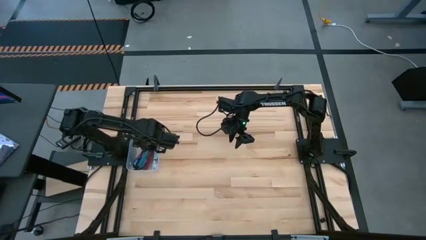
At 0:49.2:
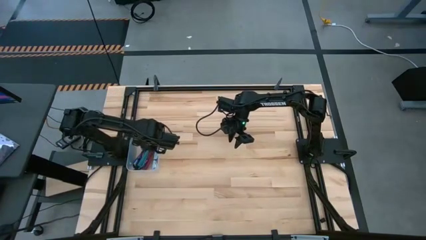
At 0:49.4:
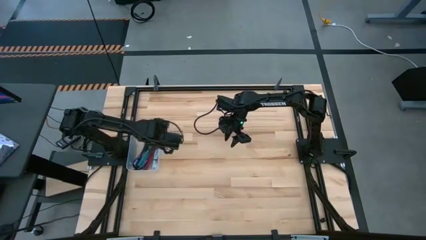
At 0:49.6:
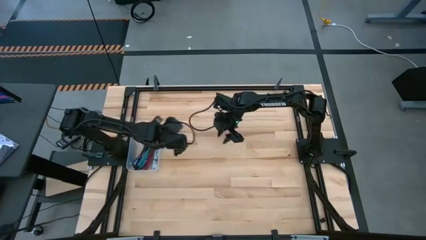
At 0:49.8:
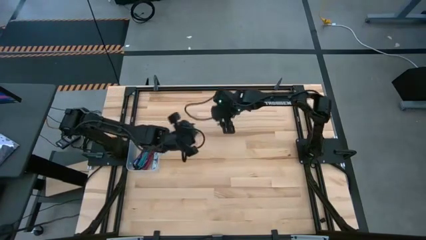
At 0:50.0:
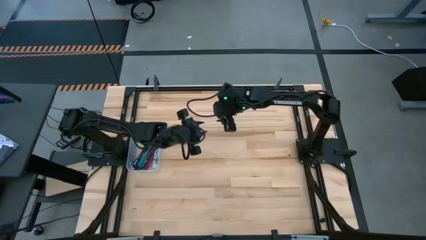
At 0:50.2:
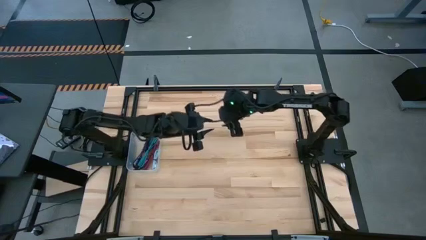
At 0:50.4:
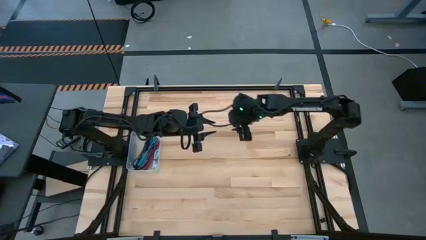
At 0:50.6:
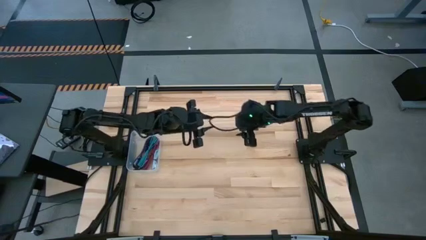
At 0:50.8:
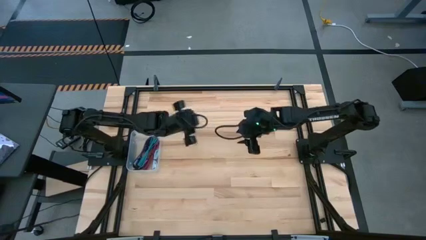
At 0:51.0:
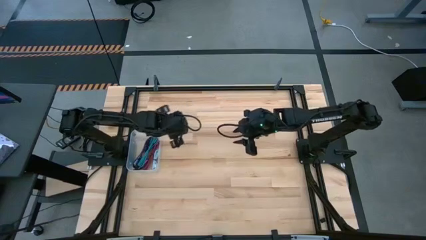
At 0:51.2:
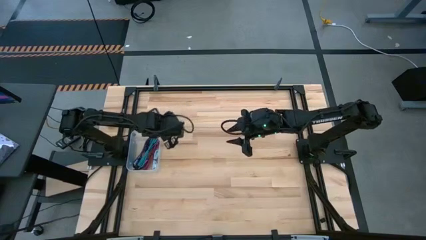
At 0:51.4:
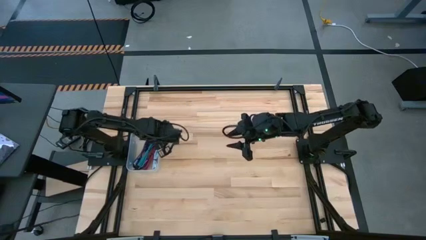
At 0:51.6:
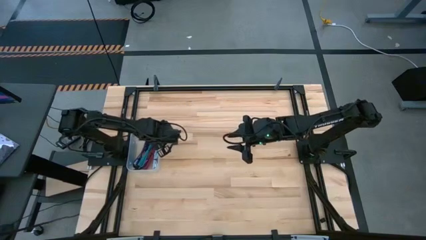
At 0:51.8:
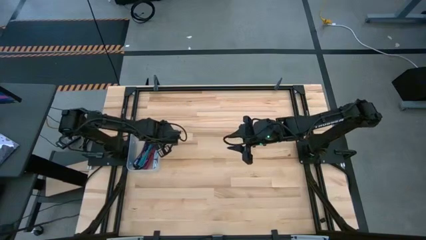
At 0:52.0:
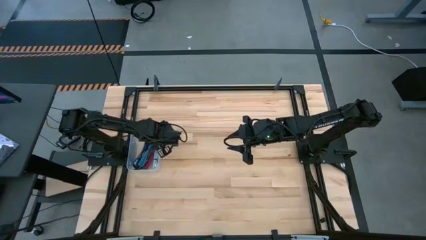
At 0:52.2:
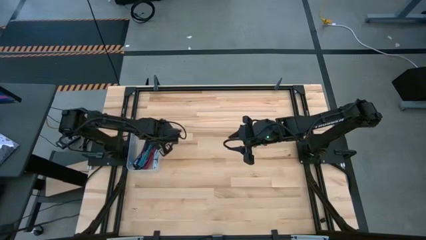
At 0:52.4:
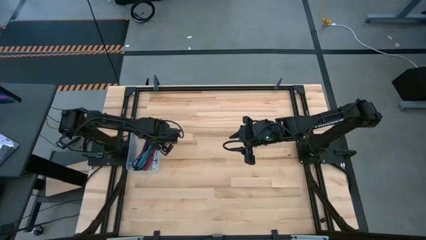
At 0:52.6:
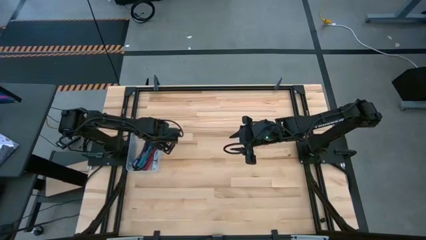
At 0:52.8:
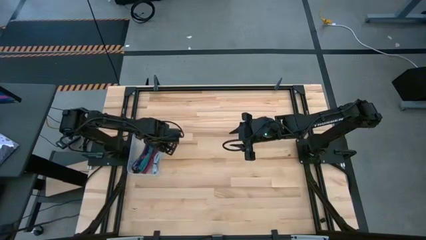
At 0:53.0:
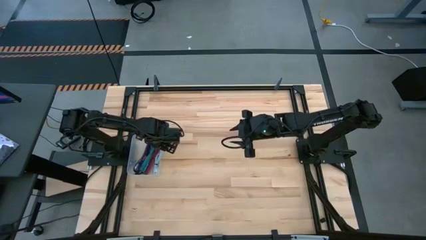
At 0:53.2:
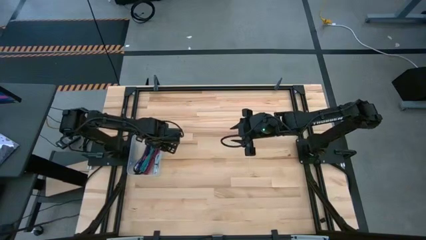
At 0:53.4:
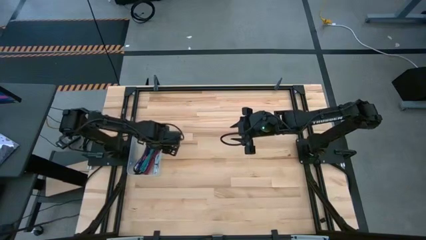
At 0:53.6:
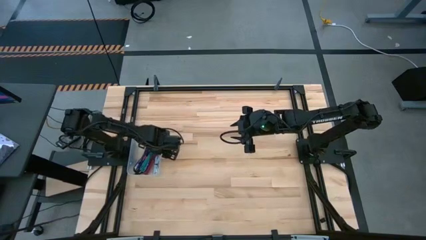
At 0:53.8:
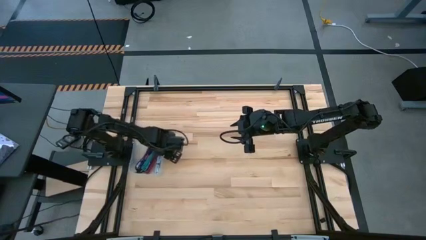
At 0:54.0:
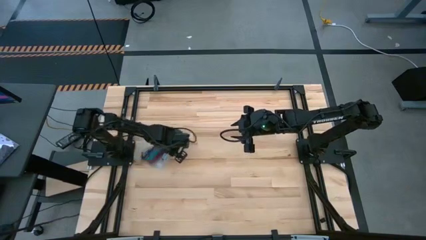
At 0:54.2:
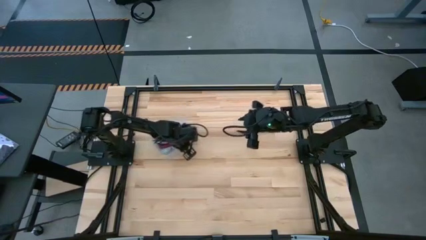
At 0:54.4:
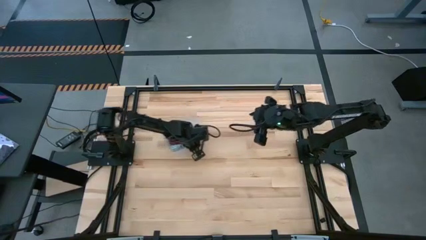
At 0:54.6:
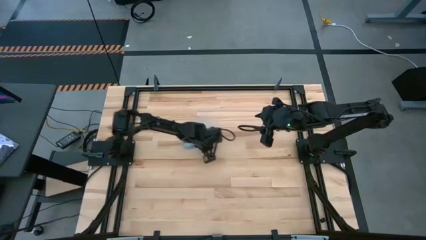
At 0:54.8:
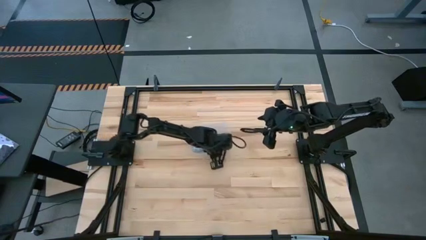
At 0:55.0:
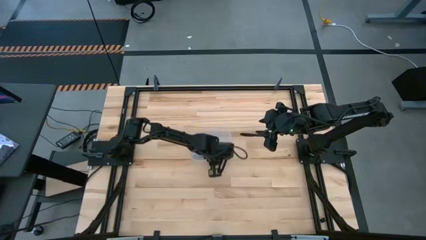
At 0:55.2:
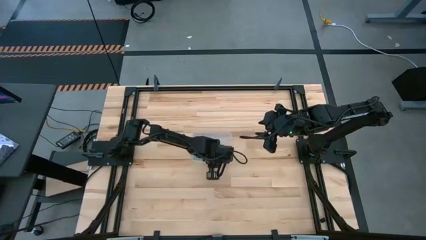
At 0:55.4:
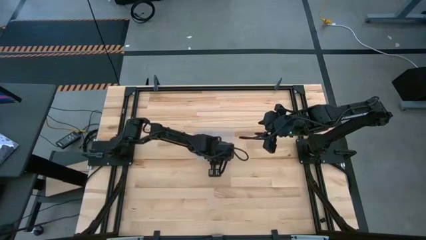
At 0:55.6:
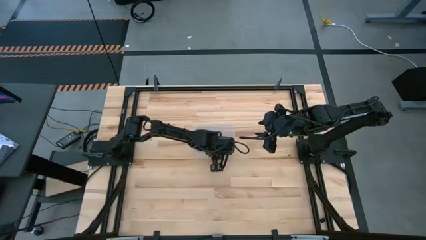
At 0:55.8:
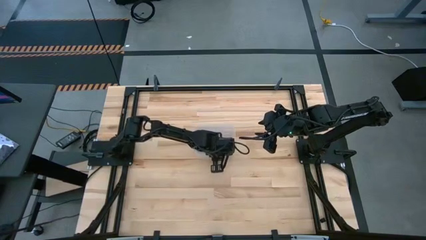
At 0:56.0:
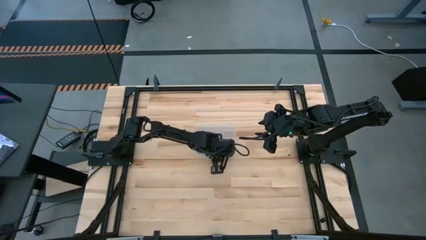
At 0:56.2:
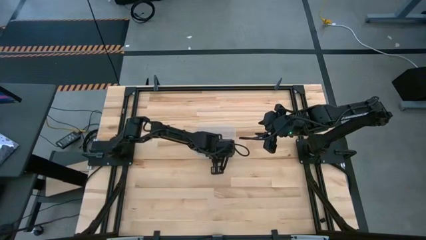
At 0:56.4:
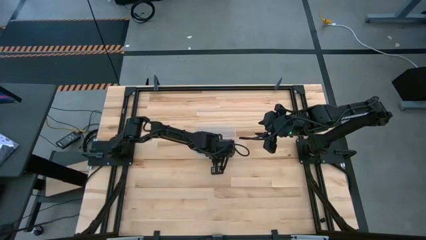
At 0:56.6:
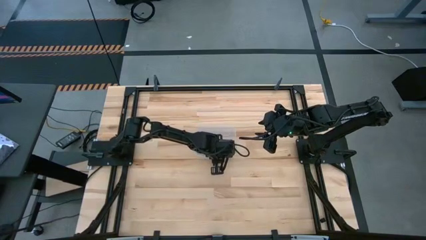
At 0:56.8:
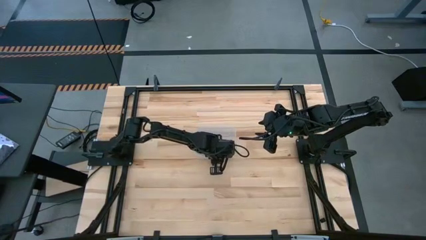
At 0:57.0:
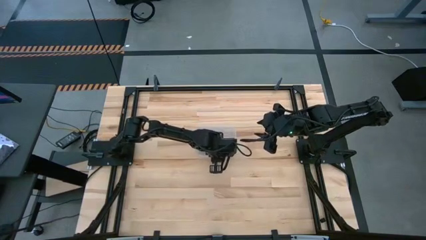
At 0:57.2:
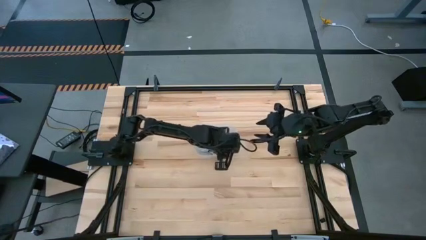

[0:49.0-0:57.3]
Task: Pick and place USB-C Cables
Move the transparent bin to the center of the table

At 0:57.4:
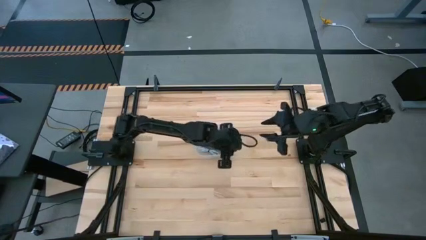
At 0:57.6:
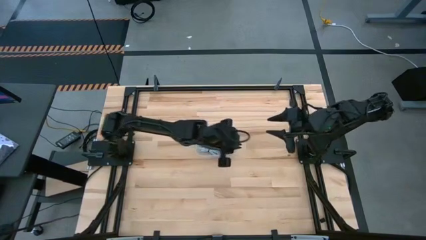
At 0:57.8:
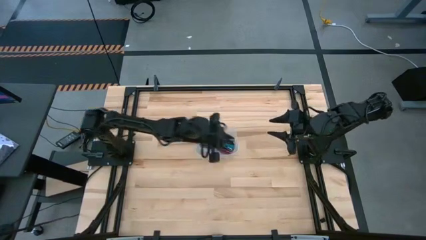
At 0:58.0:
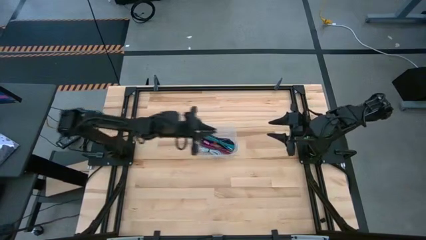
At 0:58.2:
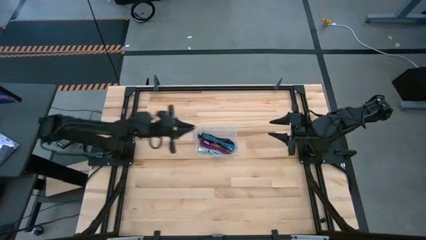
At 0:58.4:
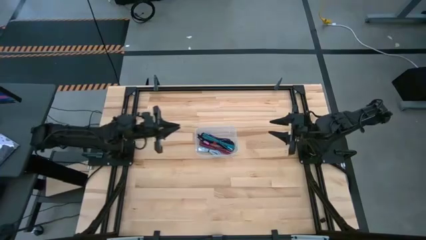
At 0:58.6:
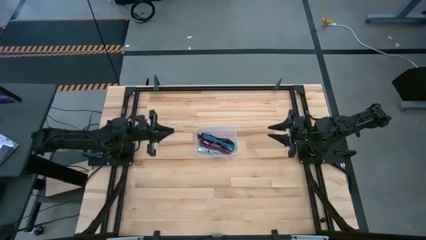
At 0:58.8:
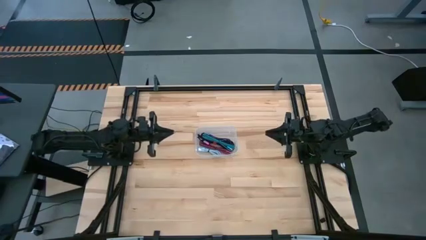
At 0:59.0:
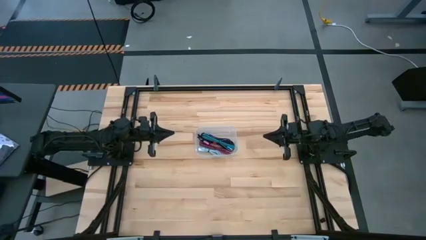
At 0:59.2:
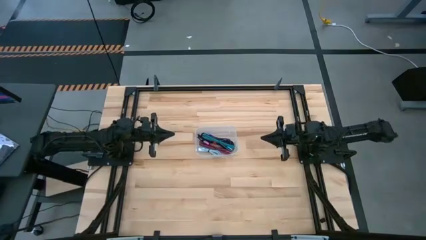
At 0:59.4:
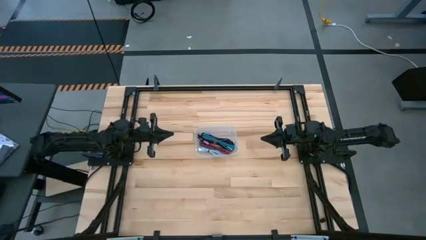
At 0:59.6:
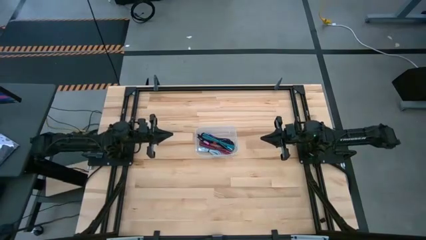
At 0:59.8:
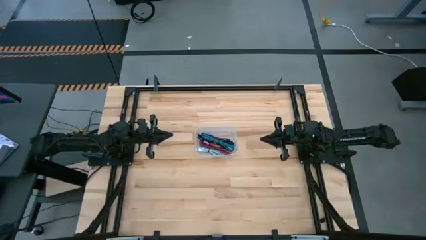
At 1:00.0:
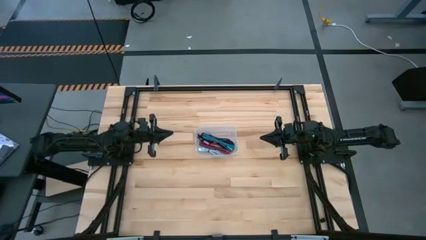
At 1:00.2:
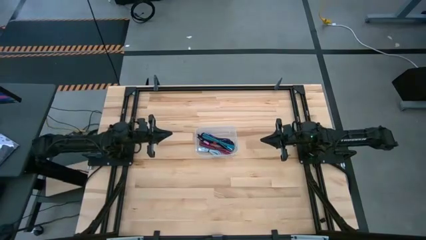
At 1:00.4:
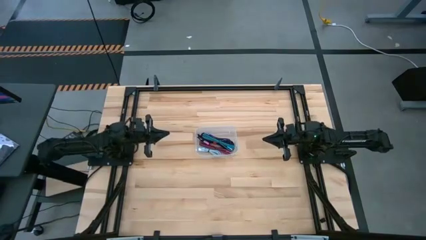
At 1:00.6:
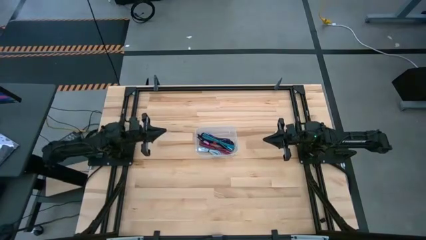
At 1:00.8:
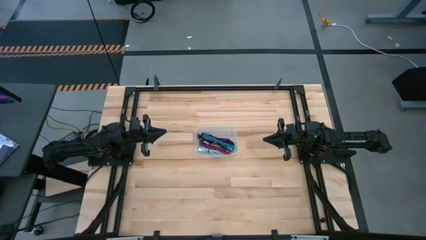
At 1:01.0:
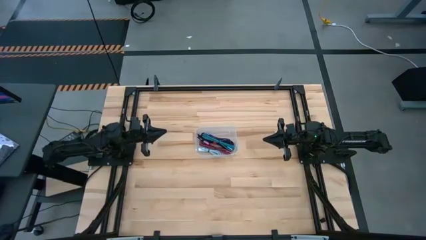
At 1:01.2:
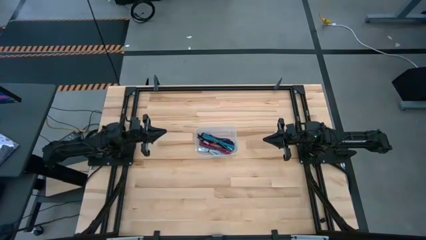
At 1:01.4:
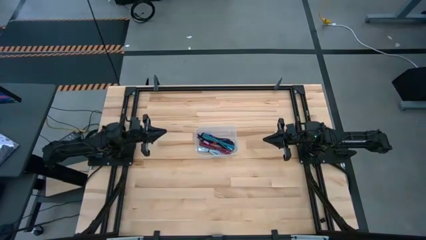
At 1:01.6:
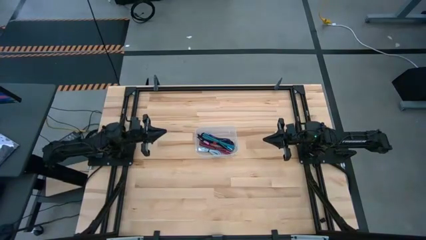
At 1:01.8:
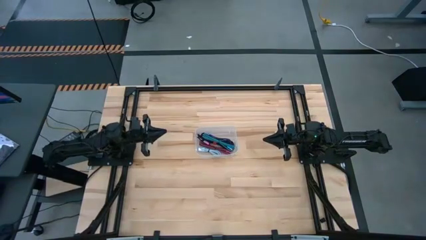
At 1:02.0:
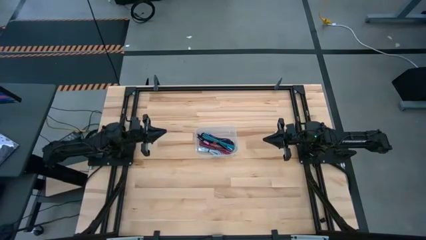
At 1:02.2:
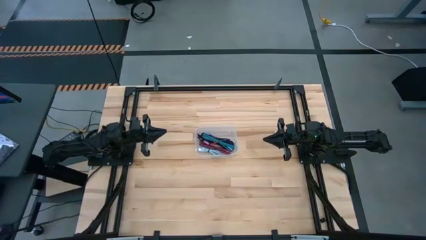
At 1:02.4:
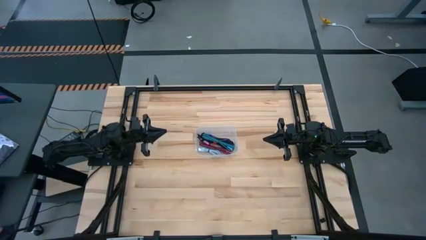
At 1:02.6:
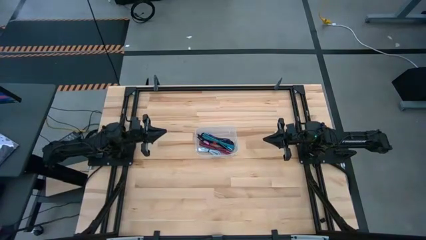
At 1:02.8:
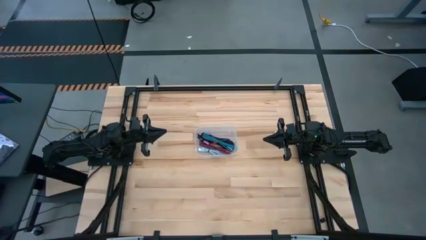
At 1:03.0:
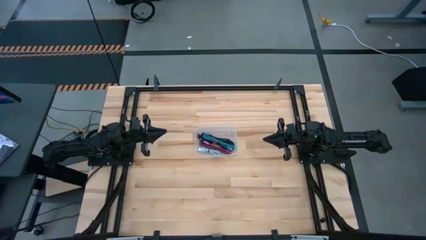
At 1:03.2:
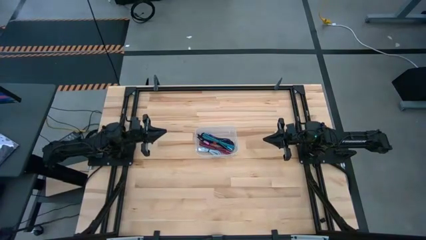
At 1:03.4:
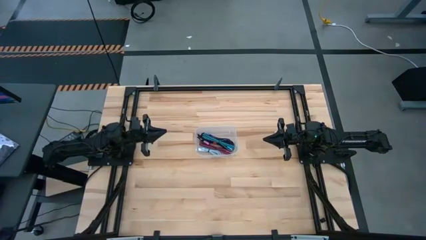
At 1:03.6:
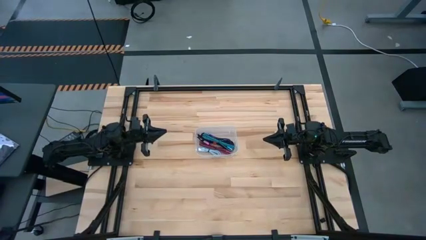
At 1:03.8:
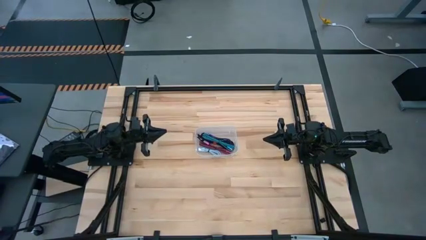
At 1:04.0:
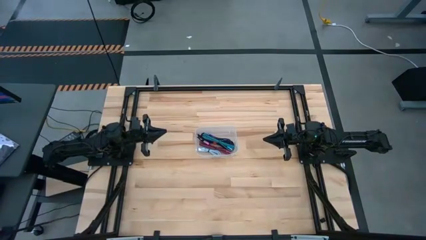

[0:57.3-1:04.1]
Return to Home Position

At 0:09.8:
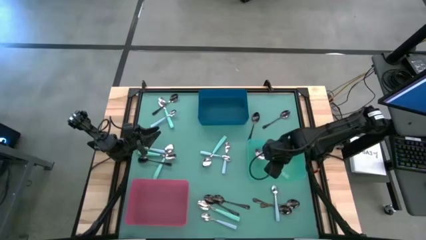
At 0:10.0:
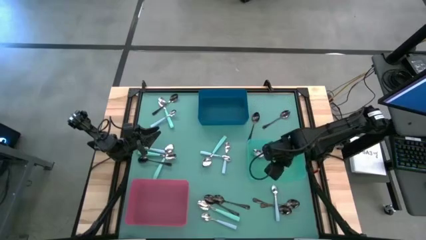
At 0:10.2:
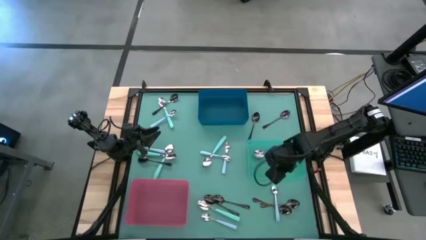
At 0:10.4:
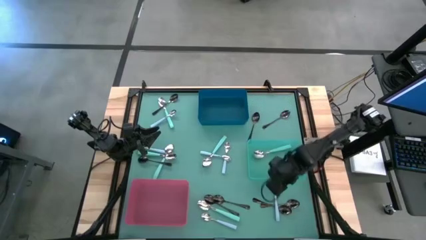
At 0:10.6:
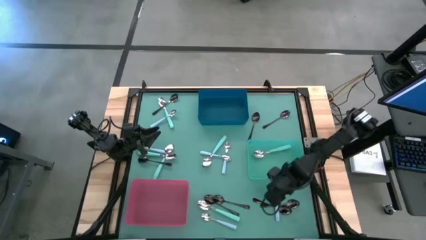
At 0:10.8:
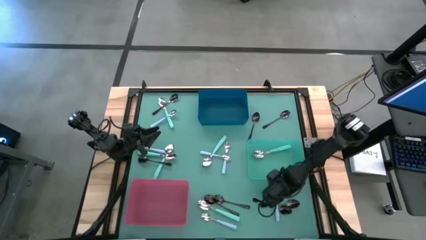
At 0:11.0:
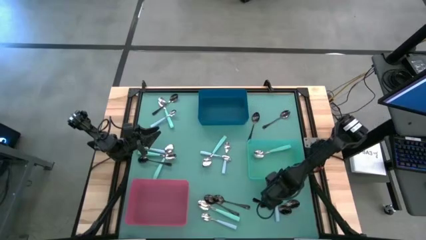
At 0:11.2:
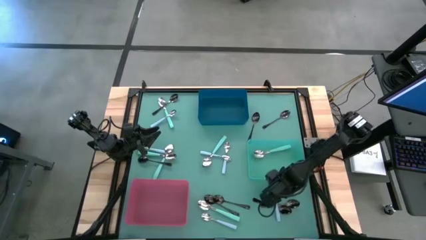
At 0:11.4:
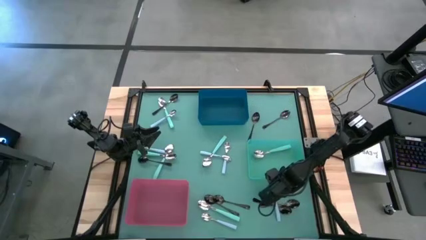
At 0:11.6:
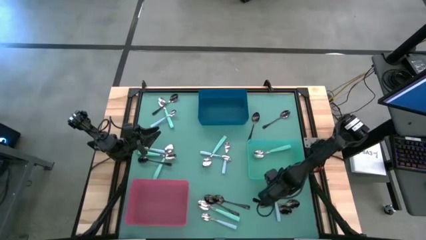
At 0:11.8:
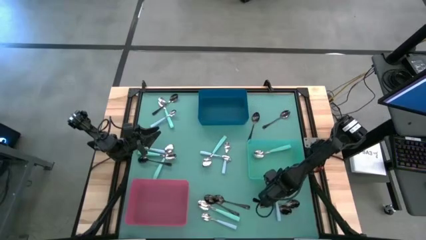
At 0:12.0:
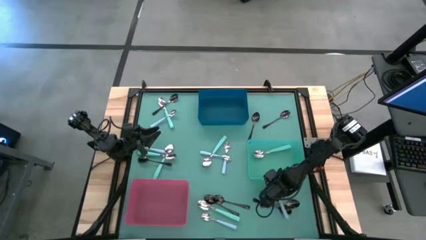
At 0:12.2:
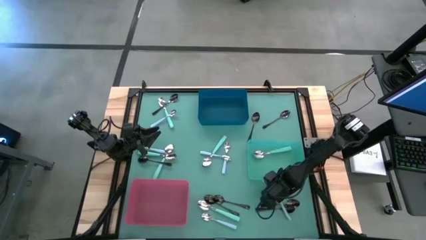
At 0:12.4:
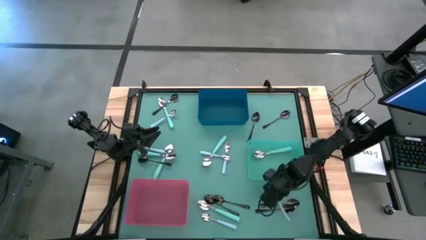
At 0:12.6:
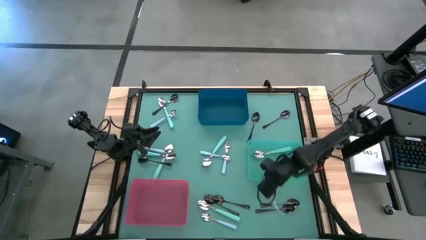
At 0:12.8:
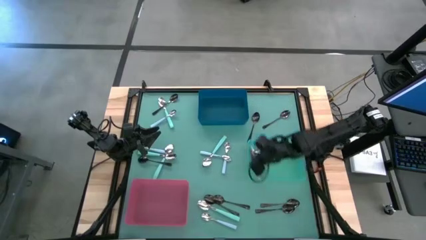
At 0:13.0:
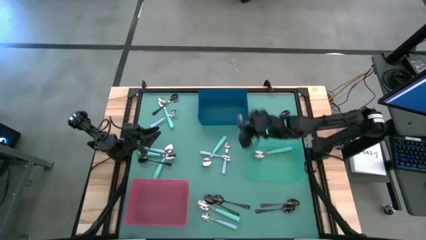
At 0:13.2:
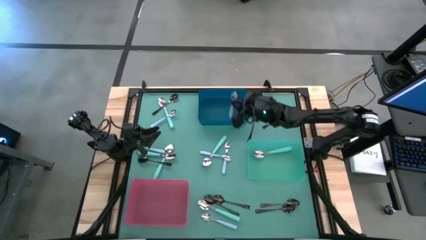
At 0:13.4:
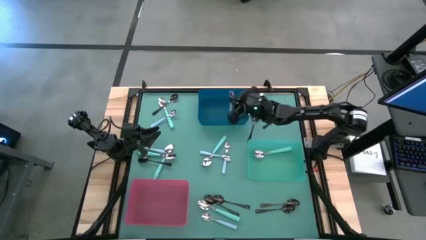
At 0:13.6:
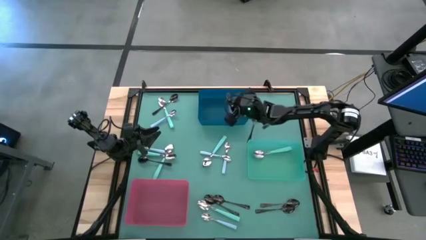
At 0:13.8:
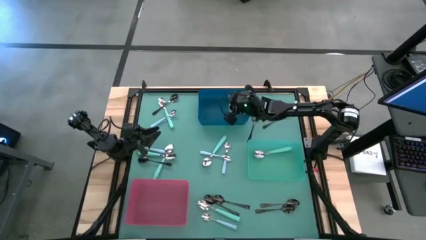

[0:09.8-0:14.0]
Task: Sort silverware by color (type)
Put the blue spoon into the blue bin
